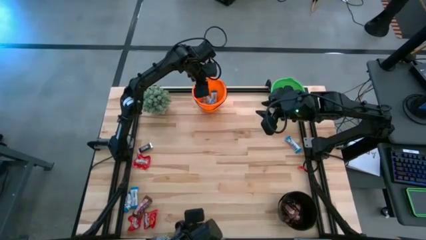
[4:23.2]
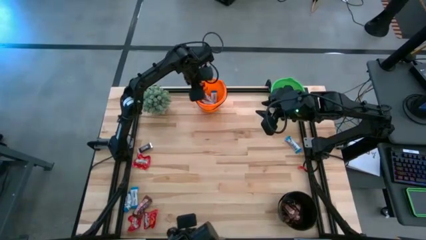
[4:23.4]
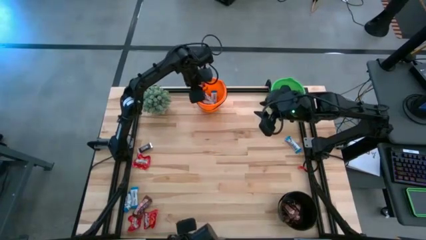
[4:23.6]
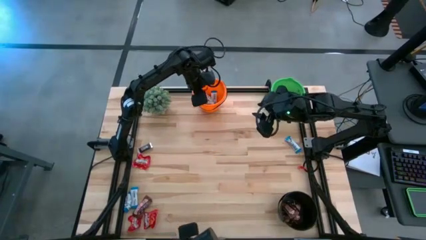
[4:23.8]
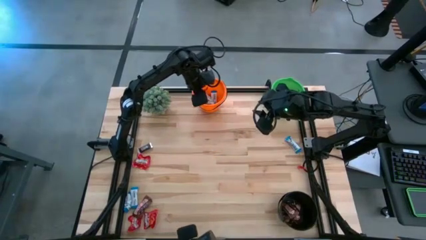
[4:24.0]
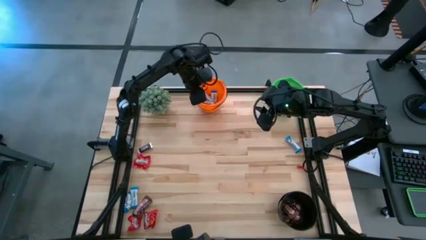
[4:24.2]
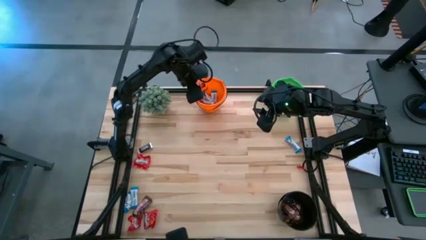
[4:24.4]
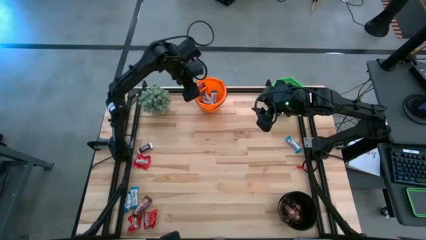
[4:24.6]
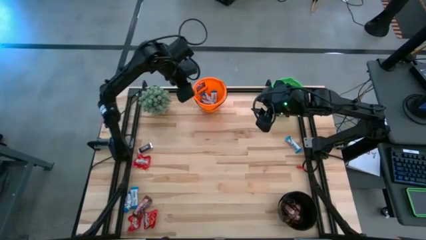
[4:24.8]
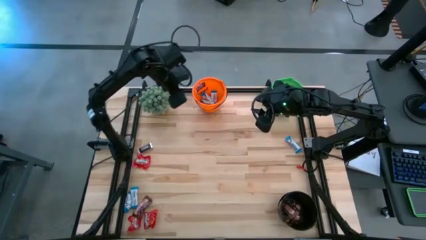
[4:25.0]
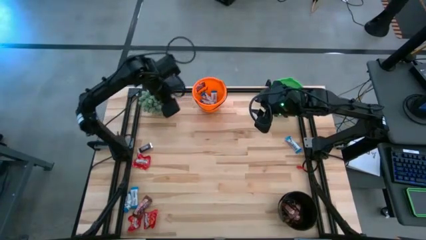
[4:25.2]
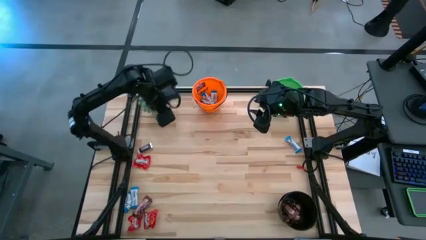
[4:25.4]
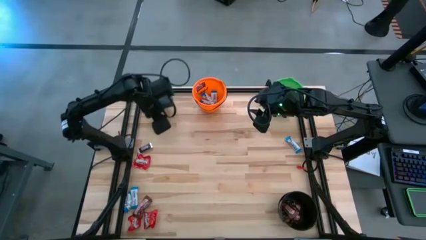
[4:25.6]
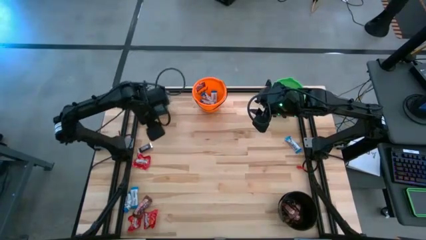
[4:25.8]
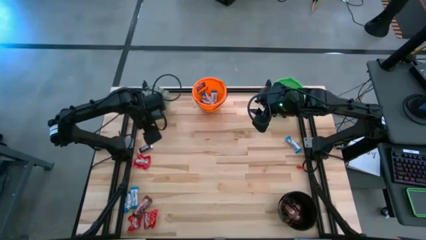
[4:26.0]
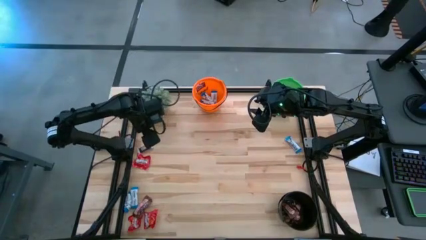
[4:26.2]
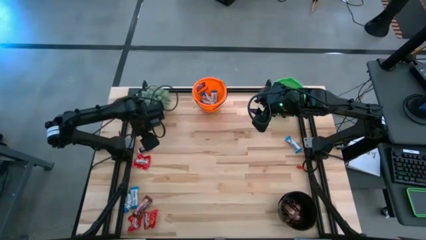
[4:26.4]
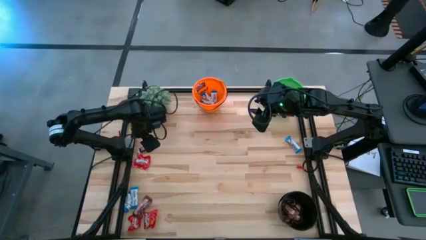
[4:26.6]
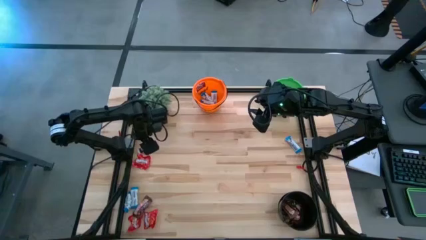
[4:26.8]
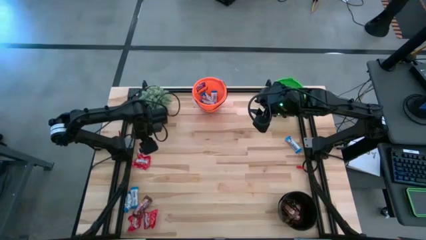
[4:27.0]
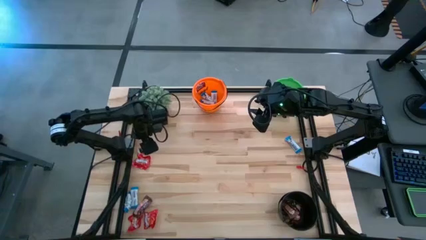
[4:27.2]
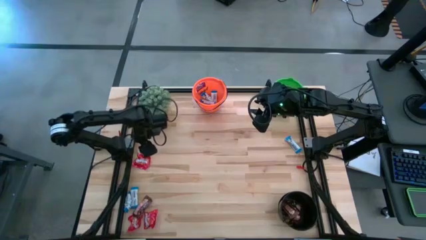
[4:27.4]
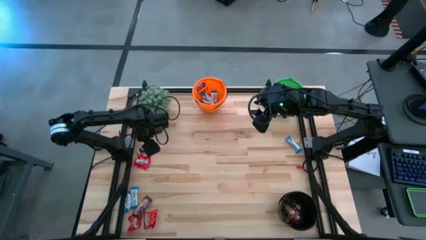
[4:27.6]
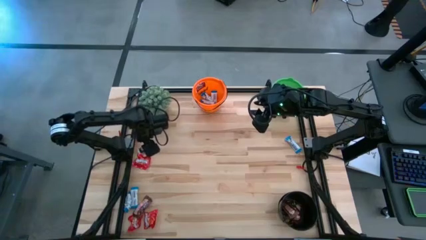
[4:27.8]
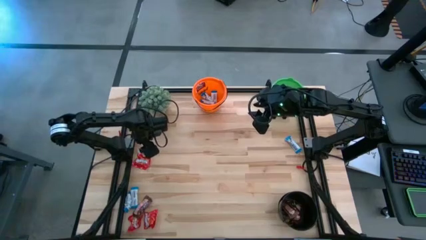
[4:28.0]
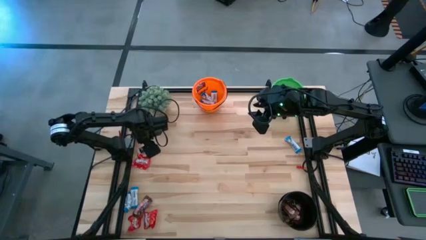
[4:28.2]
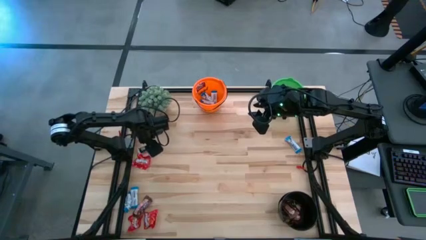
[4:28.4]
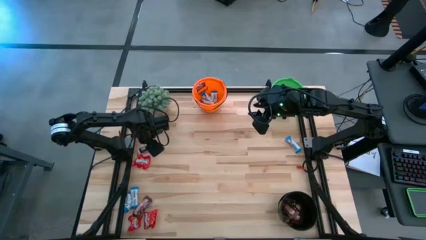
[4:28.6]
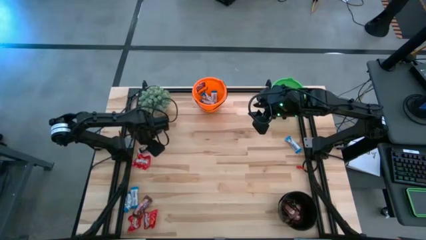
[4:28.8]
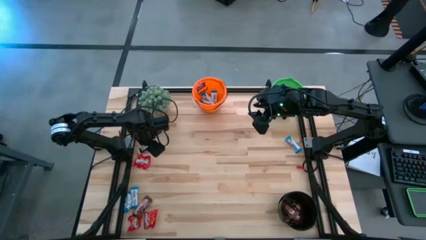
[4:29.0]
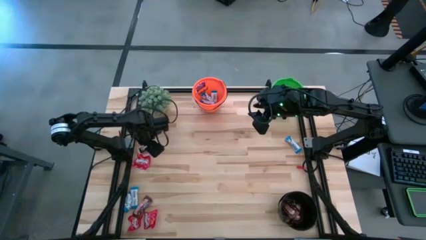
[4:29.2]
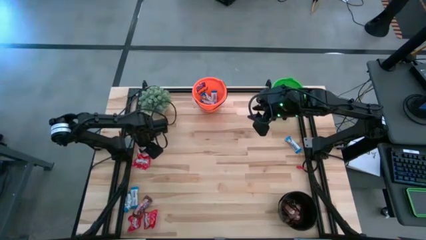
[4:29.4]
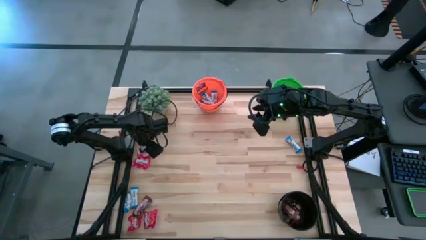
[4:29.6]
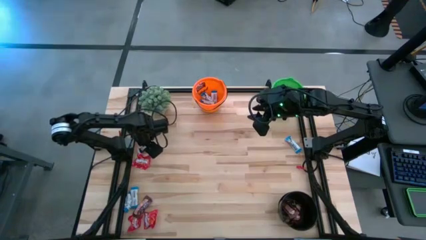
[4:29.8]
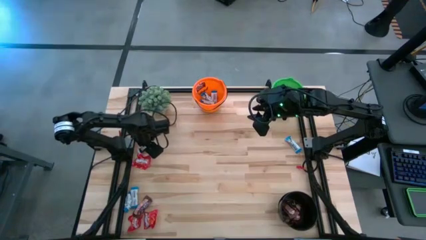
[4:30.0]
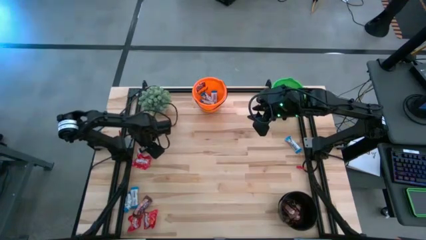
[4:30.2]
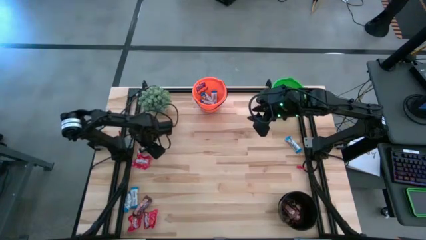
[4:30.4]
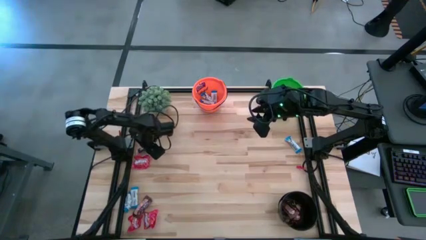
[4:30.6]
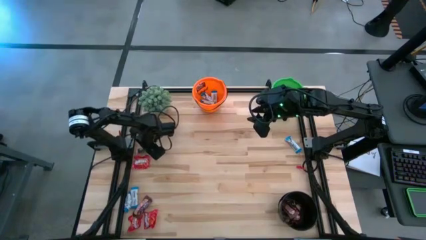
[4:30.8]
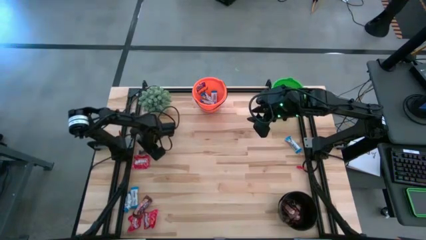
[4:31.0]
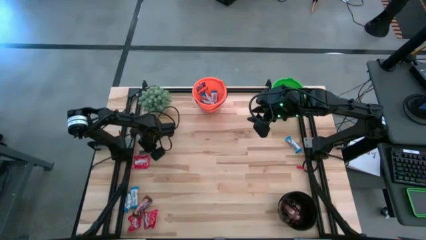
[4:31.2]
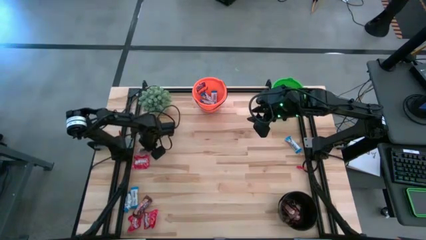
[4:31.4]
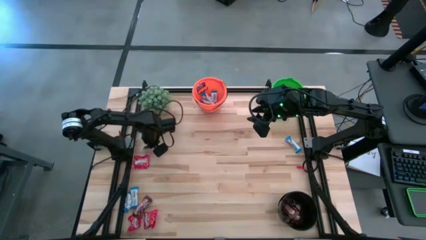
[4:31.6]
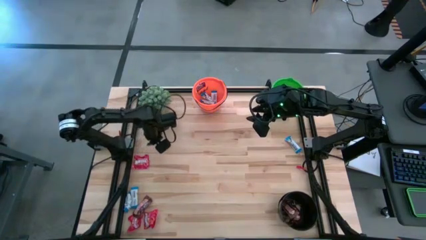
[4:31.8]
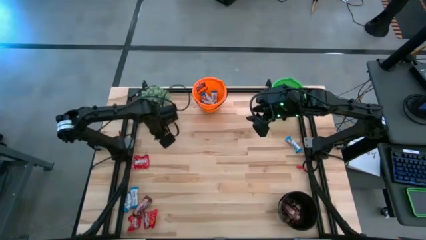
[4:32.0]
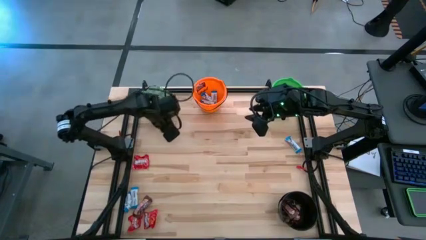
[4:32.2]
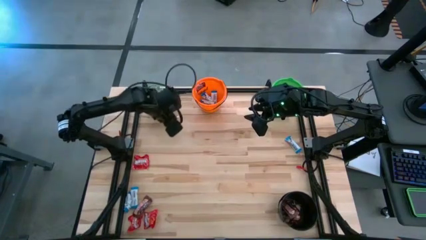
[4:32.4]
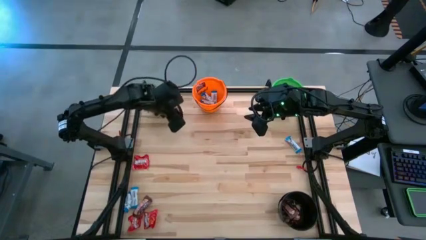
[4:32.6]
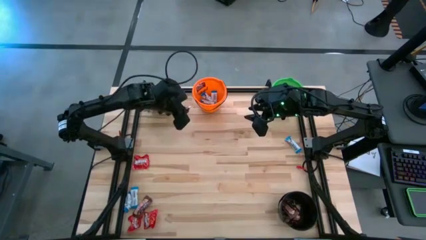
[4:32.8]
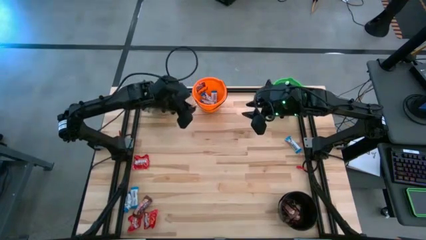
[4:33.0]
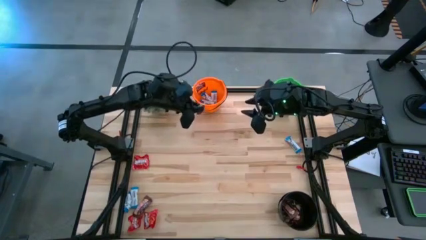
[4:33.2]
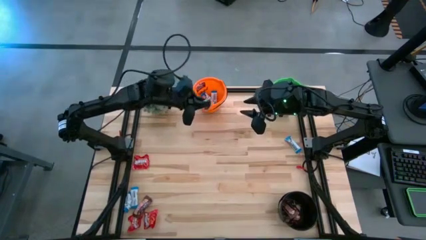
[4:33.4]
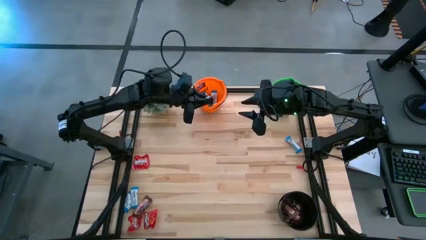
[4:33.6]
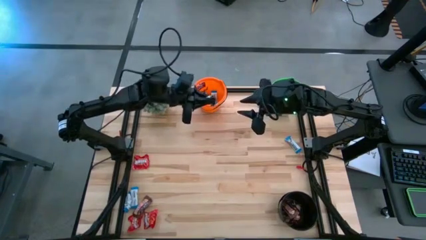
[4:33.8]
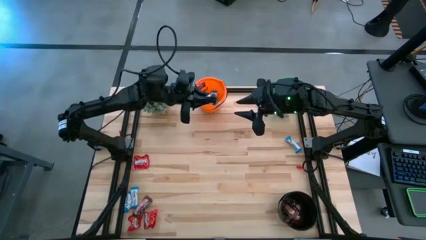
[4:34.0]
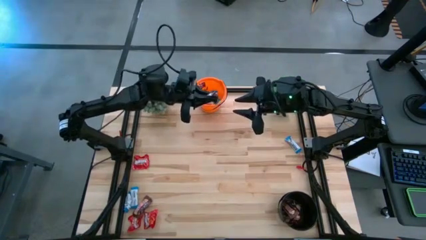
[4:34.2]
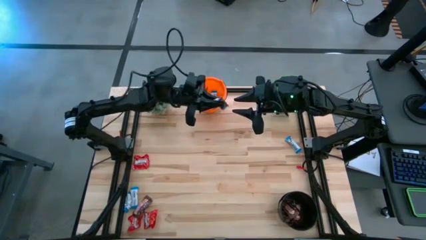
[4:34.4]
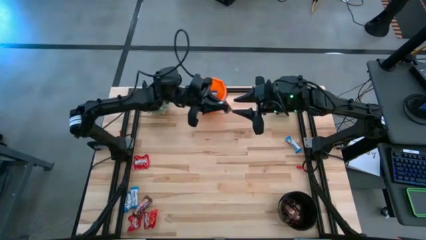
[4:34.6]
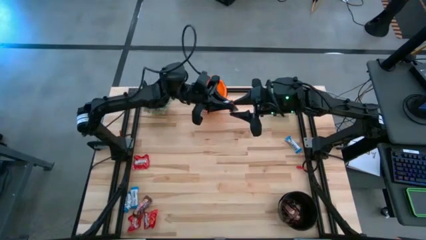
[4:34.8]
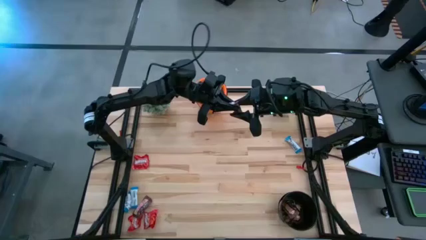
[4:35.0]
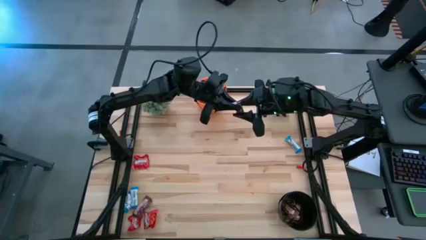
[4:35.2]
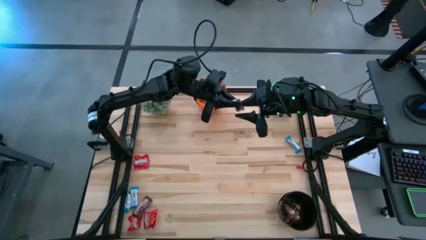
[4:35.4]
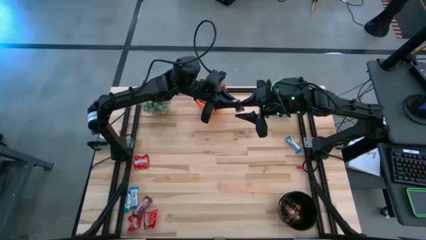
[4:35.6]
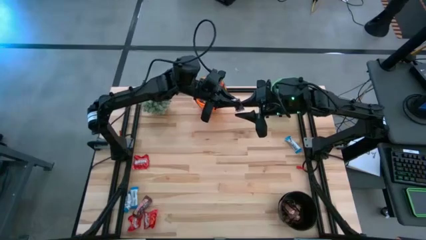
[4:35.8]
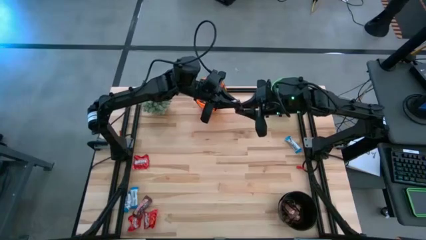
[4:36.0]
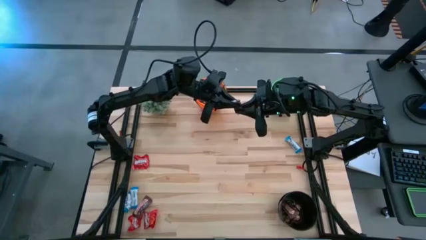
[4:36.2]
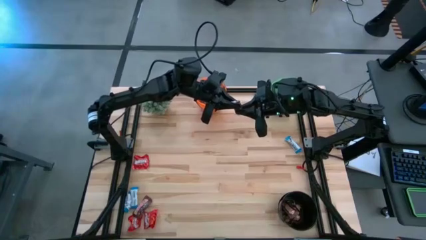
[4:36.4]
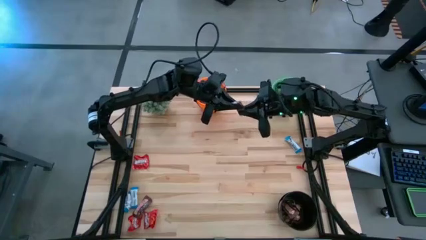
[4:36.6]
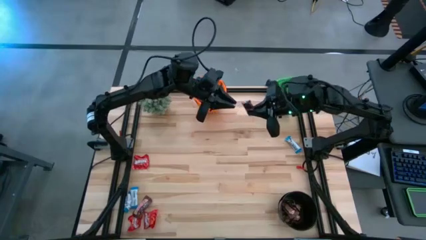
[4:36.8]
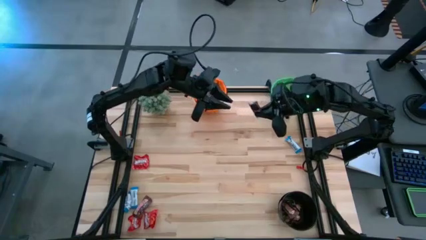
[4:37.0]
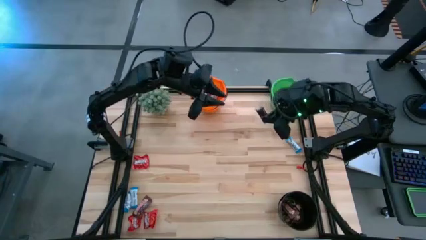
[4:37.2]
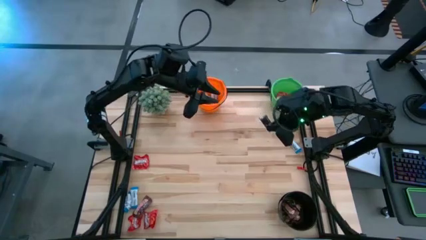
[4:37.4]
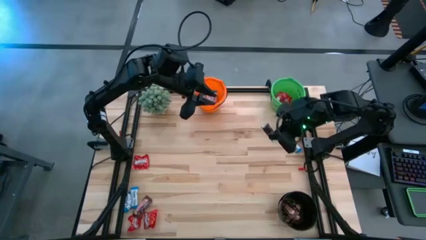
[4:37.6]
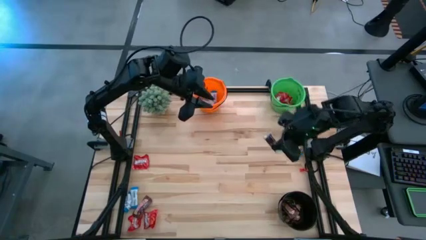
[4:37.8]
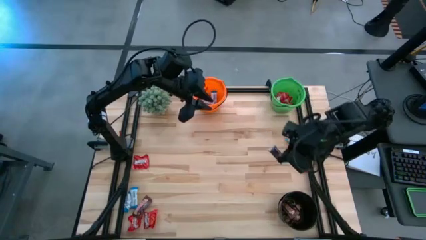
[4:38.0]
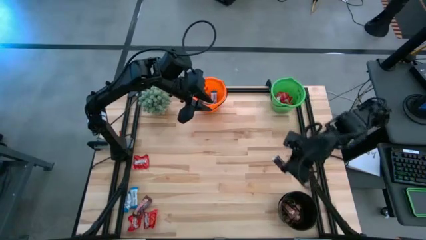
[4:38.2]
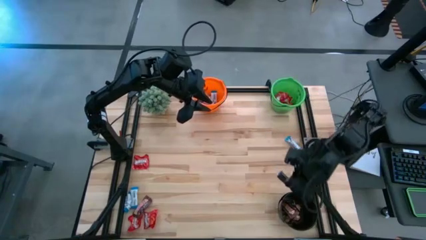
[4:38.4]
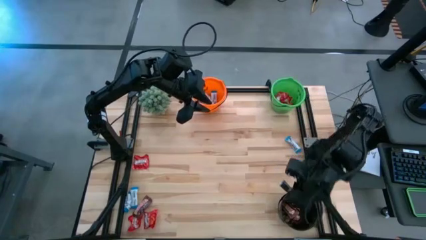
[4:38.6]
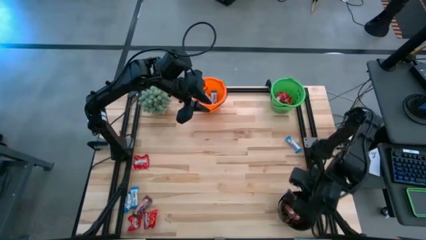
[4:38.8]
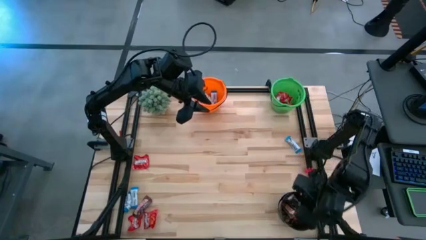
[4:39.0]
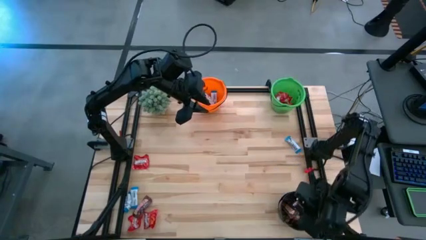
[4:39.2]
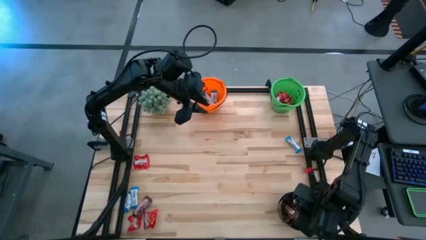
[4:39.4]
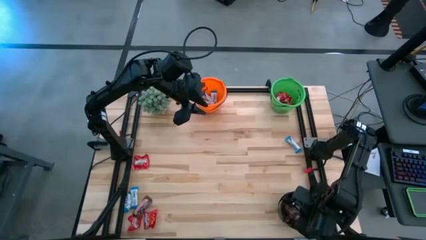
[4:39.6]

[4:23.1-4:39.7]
Task: Organize candy in baskets
Put the brown chocolate bar into the black bucket
